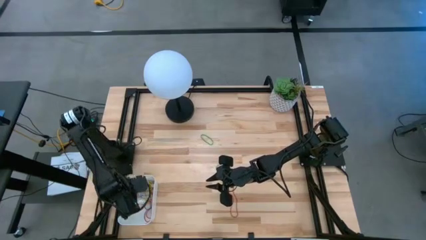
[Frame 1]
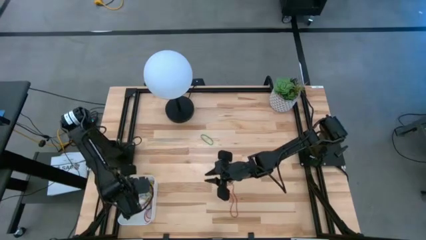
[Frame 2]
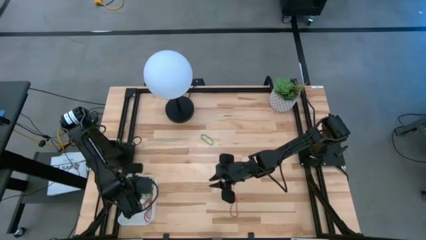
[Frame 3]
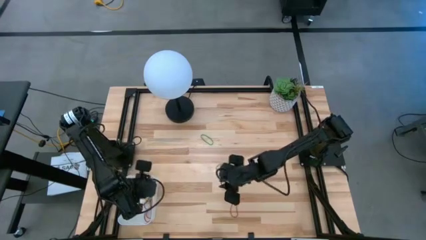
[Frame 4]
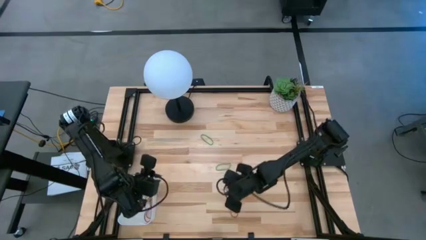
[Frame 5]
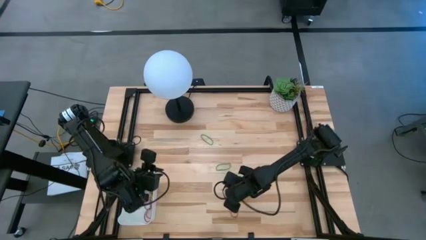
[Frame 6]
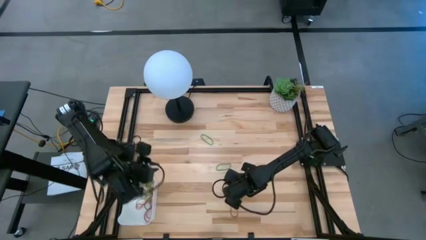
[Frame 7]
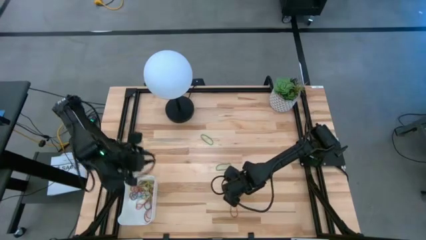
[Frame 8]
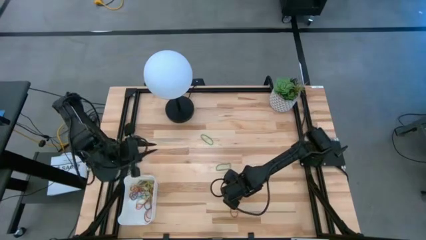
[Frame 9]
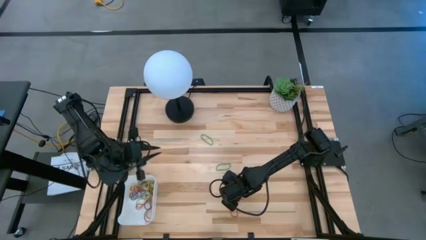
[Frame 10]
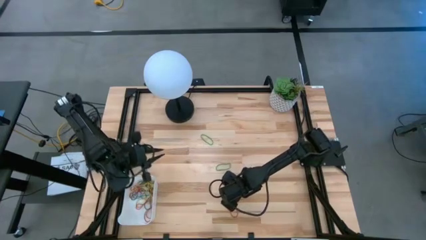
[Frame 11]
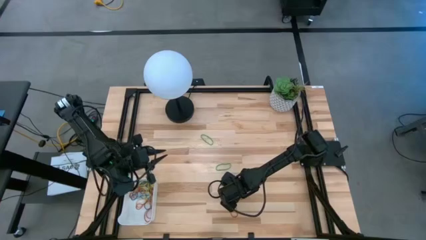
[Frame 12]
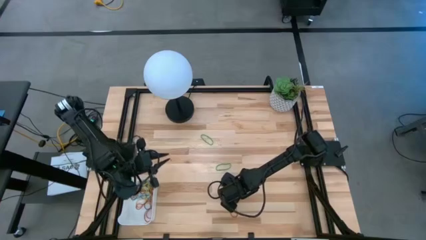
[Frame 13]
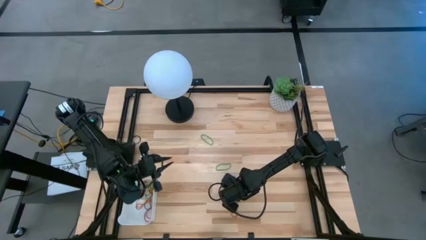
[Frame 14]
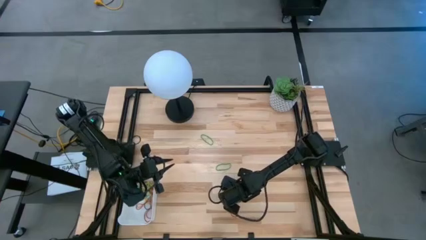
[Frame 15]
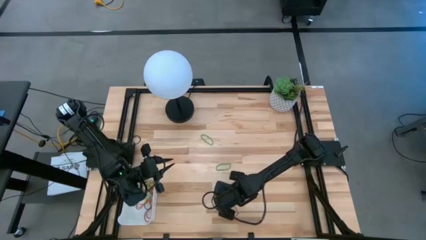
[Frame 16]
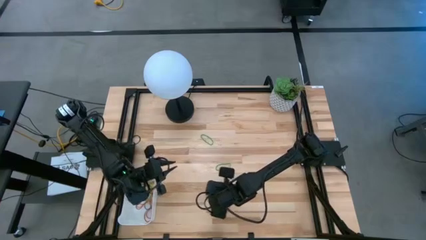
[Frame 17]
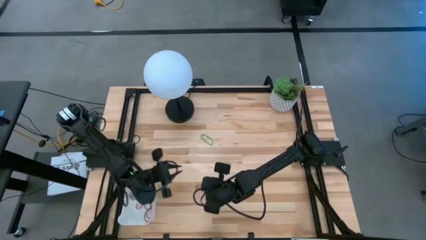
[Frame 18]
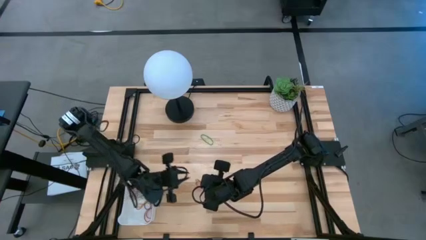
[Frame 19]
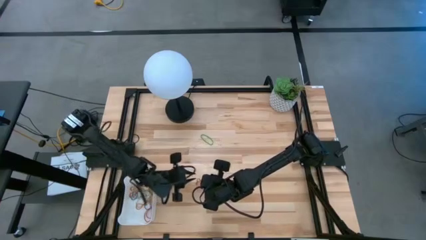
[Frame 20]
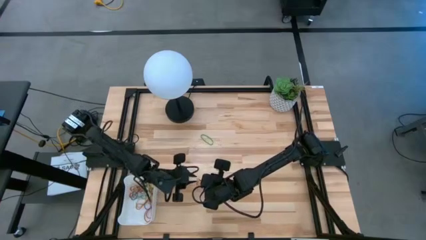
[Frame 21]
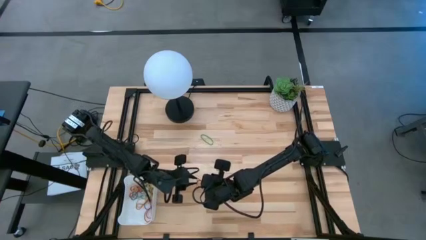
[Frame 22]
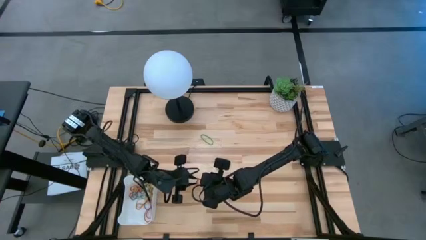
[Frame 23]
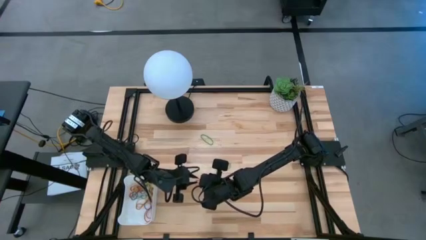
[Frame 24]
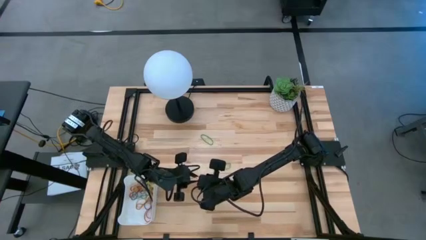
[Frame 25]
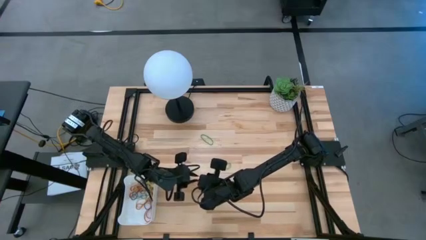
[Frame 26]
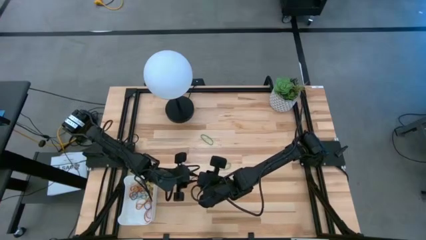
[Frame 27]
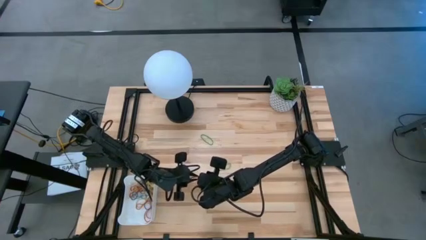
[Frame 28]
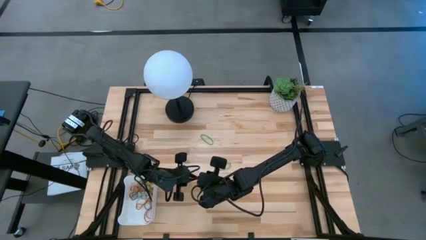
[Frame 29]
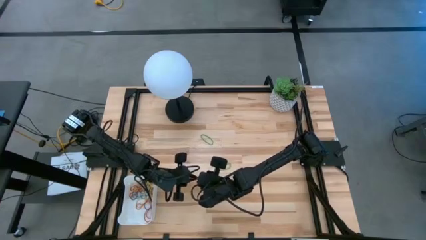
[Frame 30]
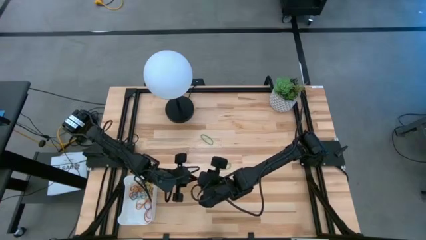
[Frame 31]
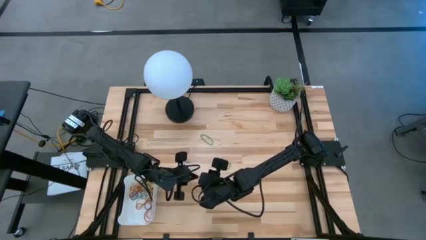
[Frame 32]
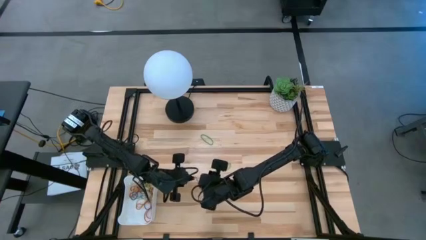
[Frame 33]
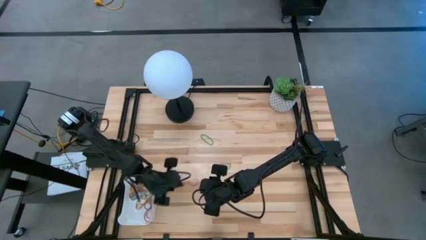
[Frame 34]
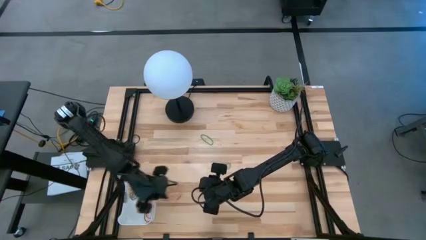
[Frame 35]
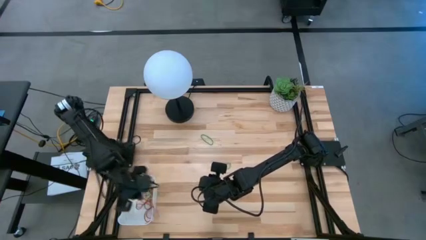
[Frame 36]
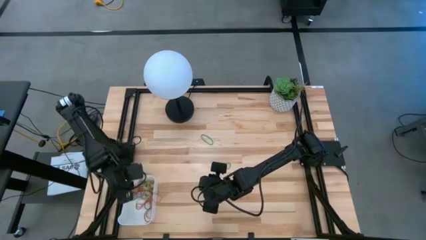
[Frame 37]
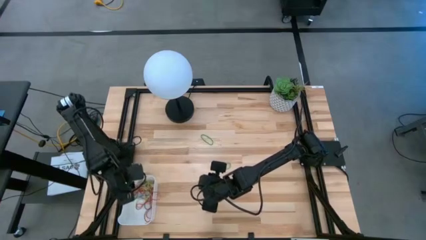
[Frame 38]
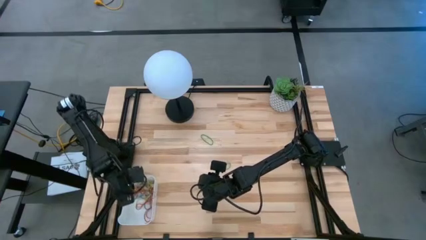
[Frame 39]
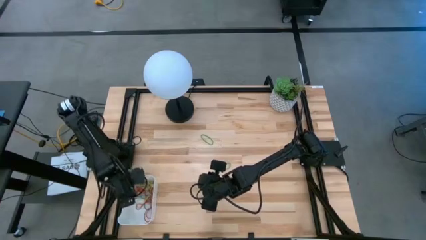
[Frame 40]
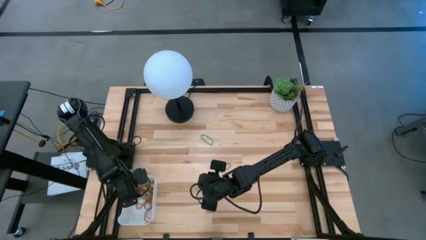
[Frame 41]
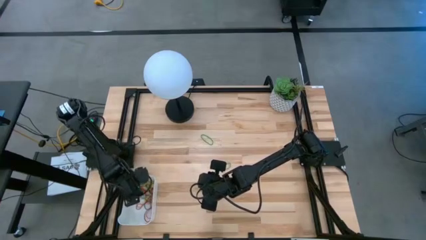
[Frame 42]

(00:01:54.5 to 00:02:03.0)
Task: Pick and place items into bin
Put the red rubber band into the white bin

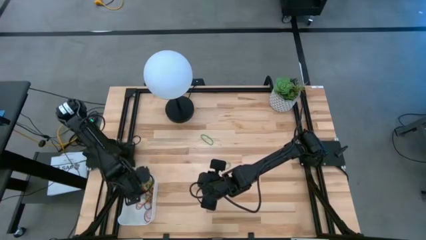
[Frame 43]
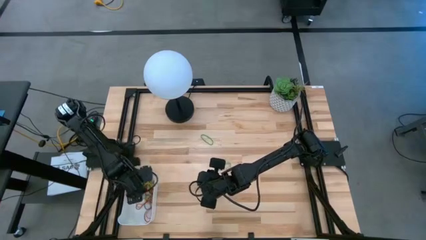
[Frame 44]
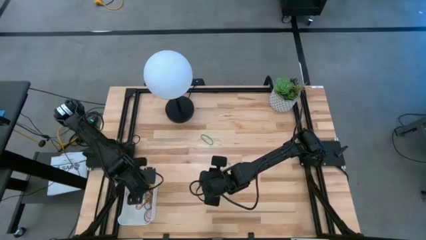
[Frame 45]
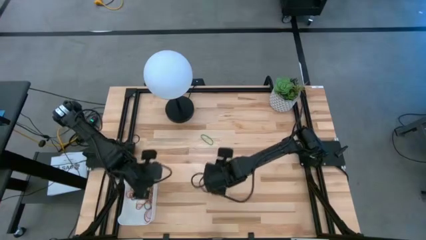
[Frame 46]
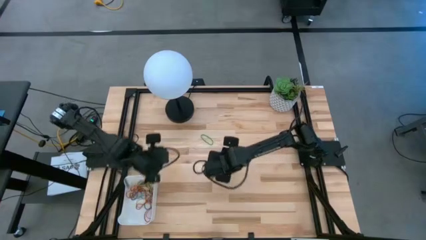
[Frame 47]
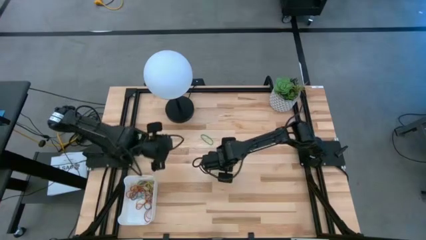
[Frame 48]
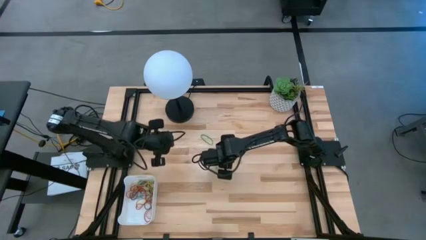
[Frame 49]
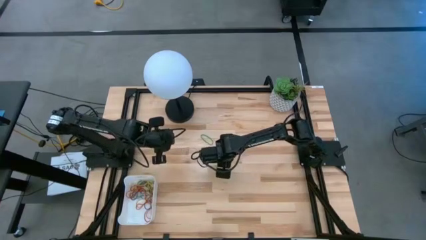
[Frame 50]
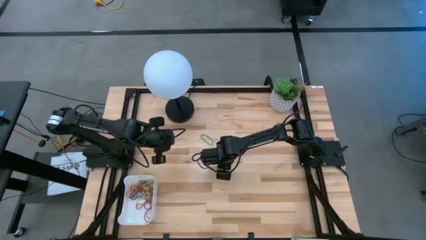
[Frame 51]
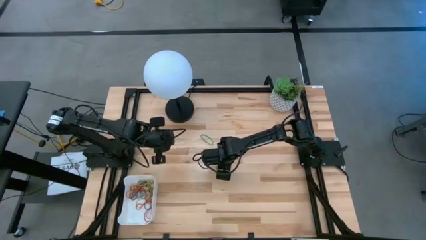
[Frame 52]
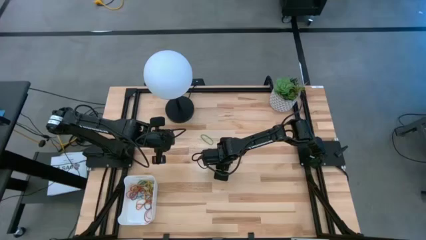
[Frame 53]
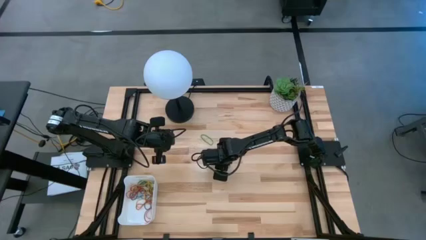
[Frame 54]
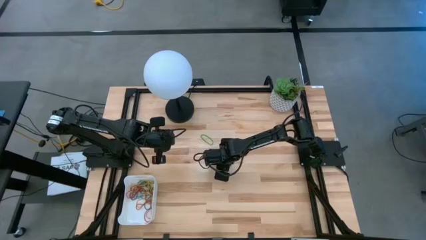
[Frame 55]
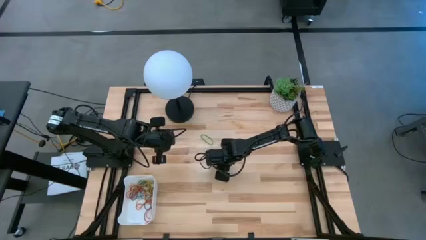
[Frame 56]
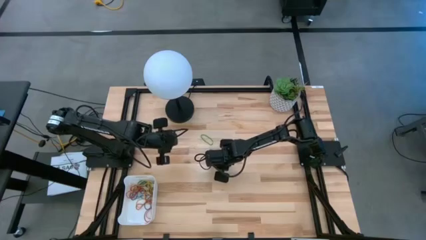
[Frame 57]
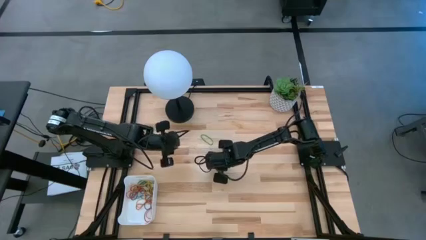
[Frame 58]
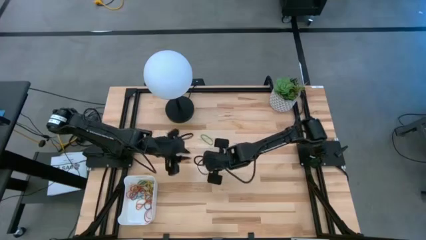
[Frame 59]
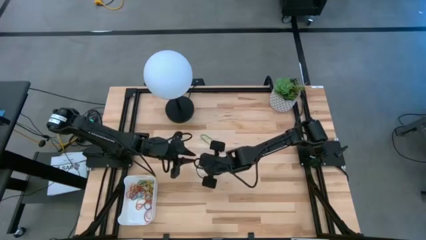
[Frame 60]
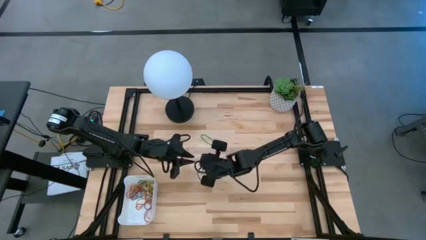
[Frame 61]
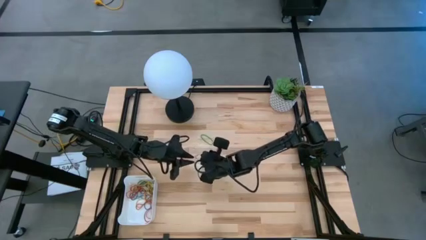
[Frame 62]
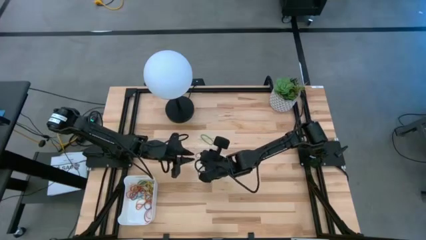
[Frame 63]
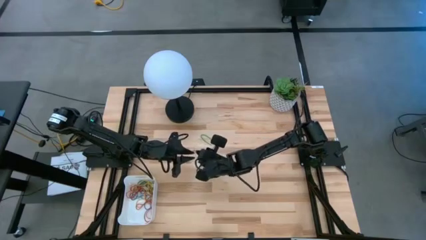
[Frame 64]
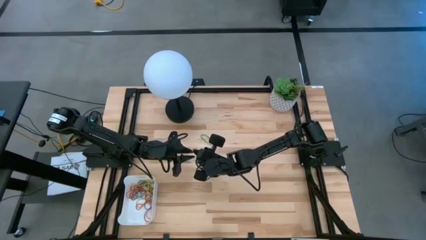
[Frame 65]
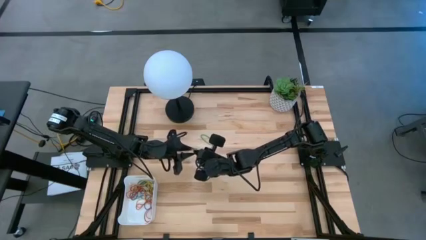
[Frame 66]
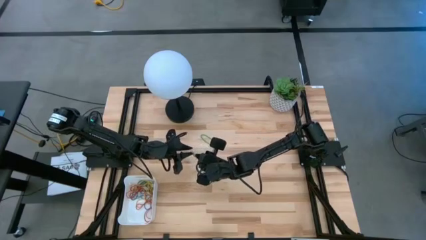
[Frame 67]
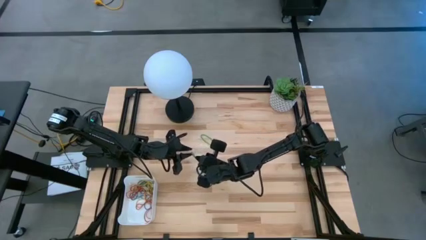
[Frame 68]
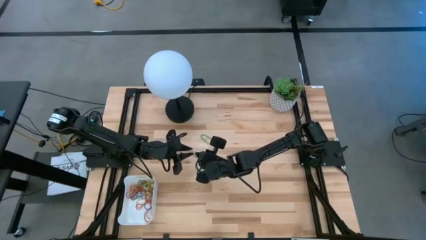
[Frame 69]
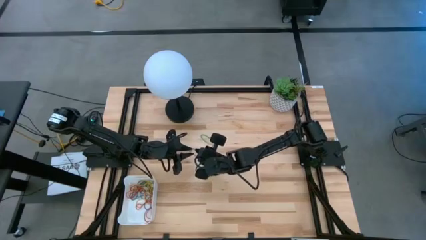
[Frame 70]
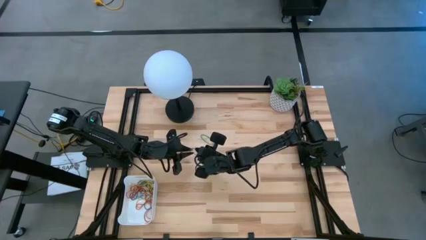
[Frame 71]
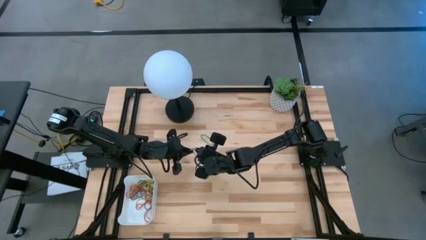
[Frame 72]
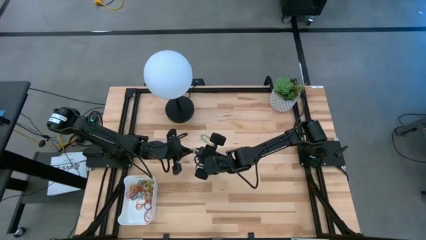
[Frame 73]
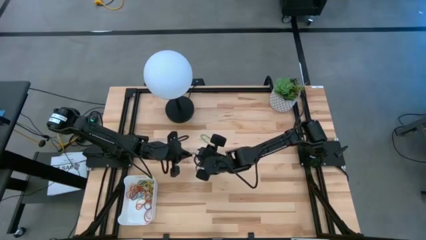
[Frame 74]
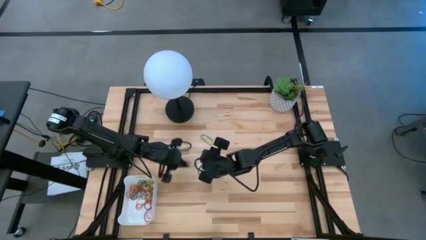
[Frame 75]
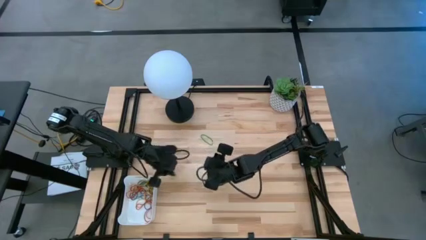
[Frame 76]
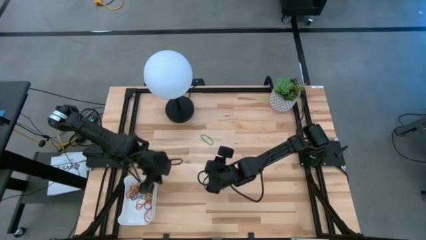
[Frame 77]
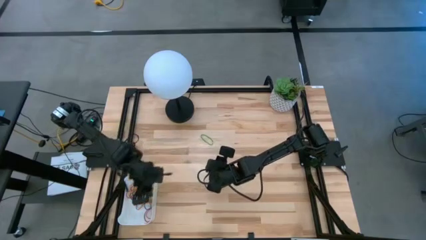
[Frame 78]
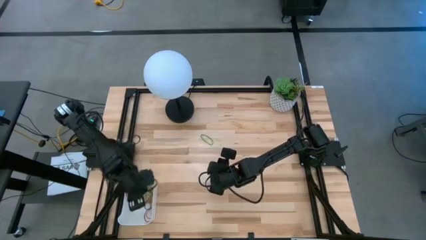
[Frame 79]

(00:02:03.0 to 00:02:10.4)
Put the bottom green rubber band into the white bin

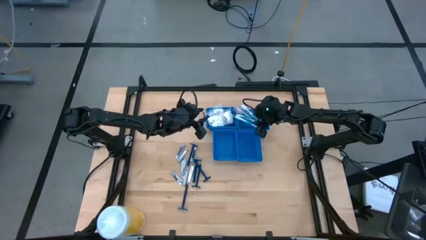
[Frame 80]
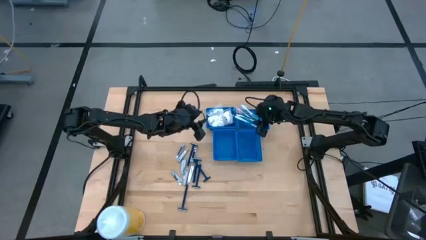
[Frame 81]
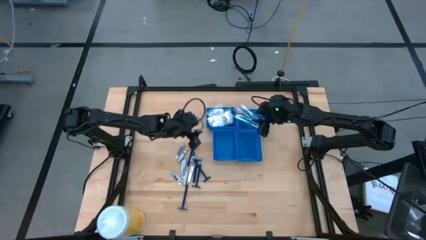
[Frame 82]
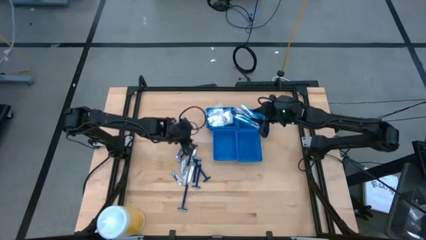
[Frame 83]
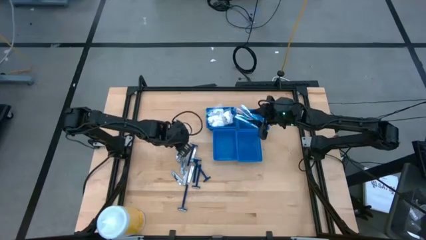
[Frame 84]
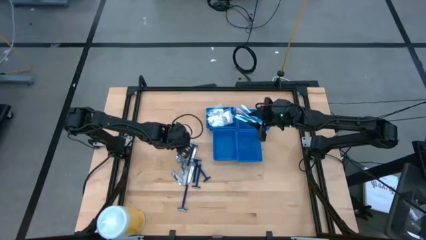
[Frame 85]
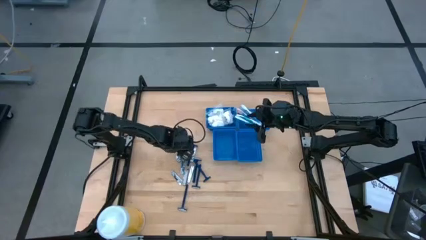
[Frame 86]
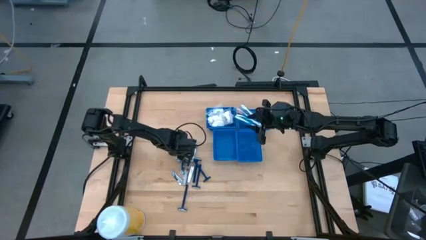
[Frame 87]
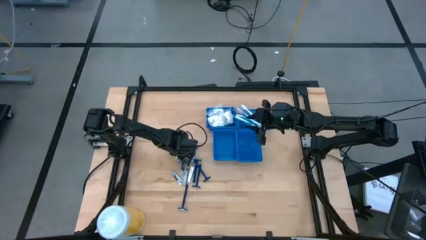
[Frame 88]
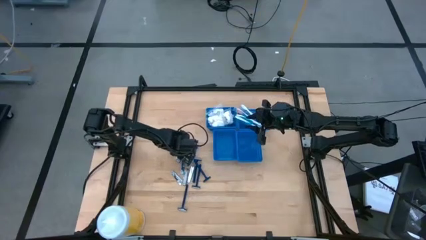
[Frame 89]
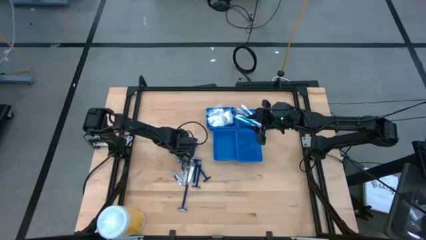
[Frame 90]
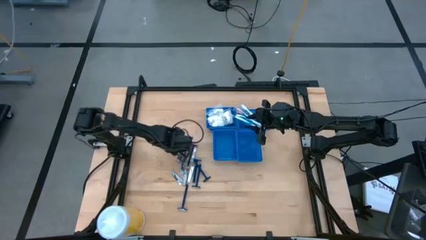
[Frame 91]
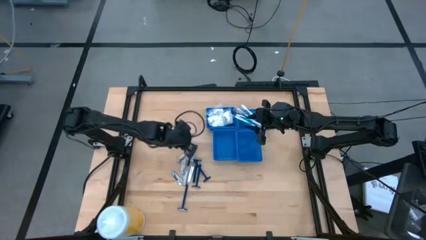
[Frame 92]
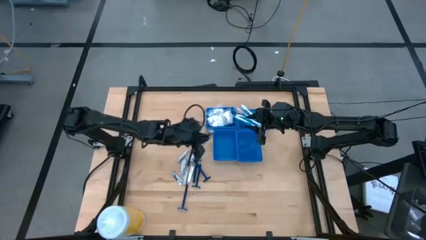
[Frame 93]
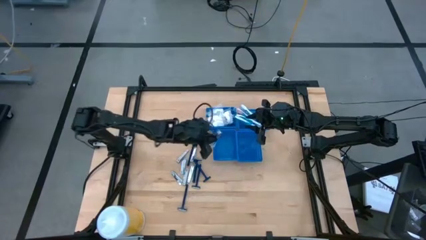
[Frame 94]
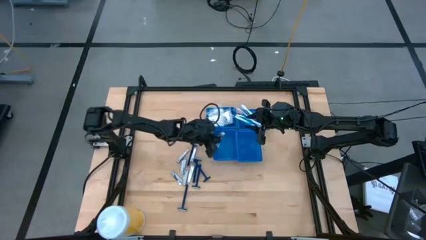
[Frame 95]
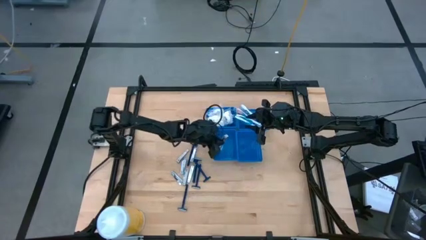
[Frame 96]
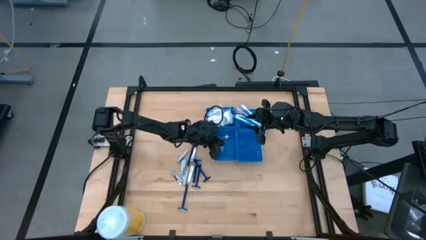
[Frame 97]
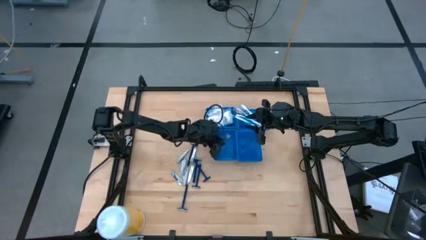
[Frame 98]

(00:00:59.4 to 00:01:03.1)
Task: Pick & Place Travel size toiletries
Put the silver nail cutter into the bottom left blue basket
